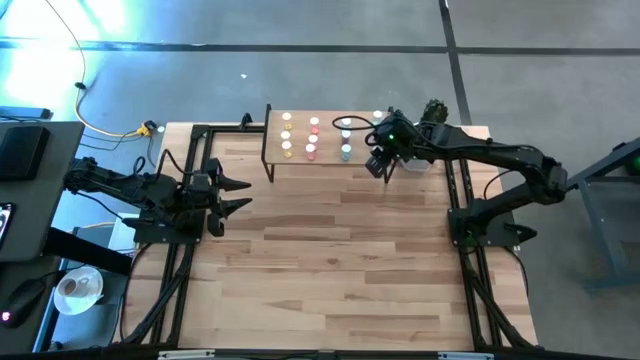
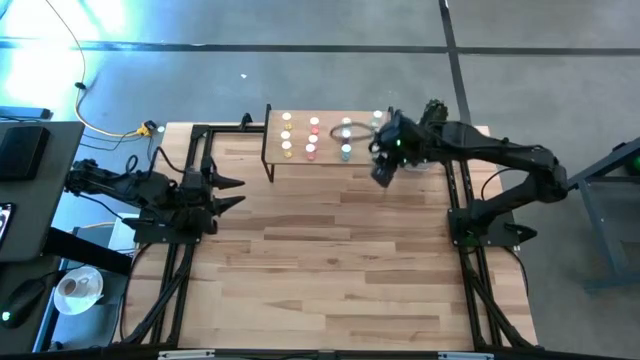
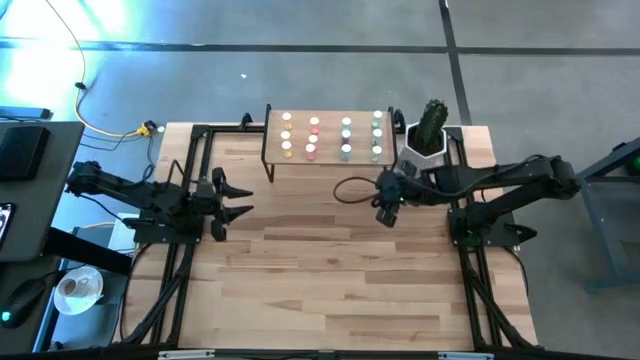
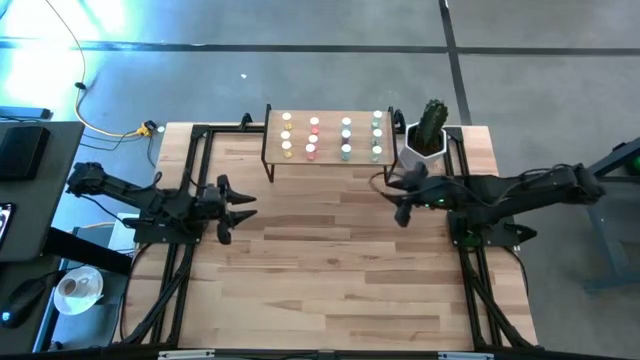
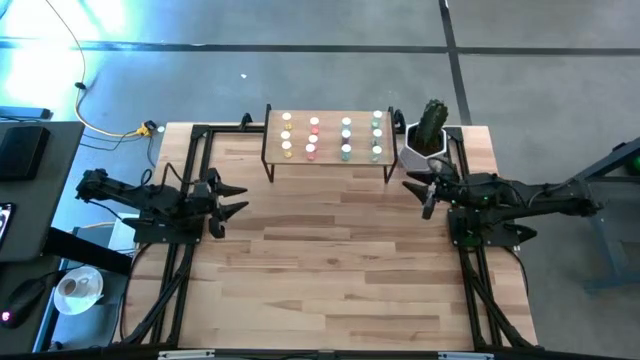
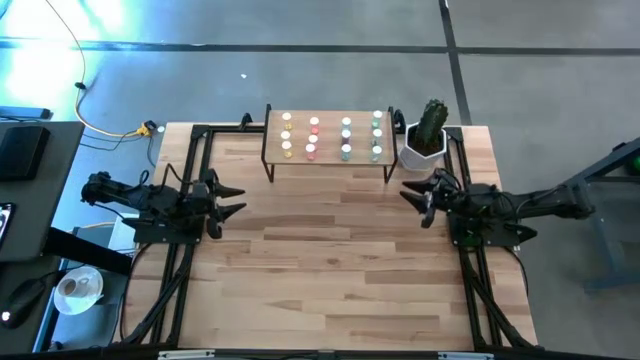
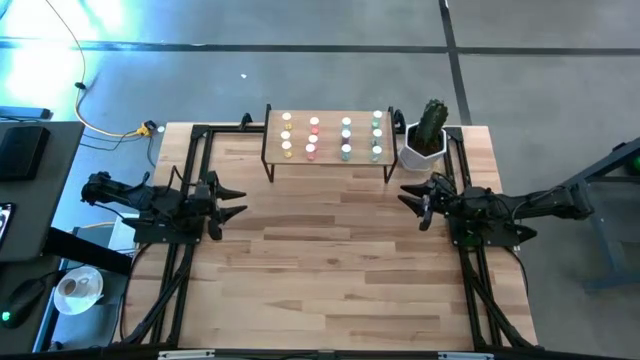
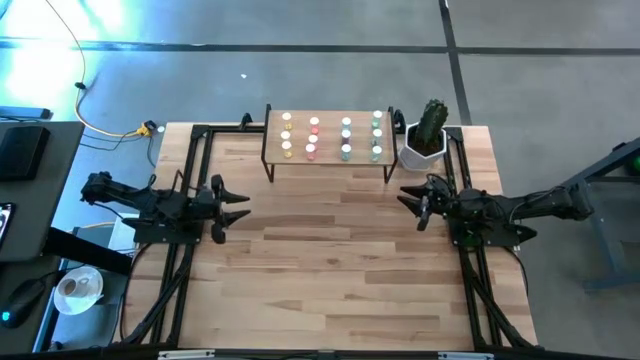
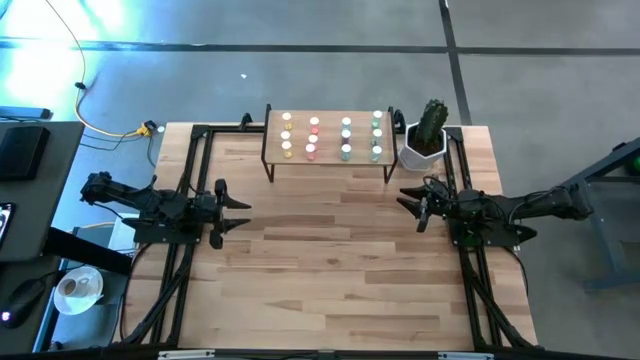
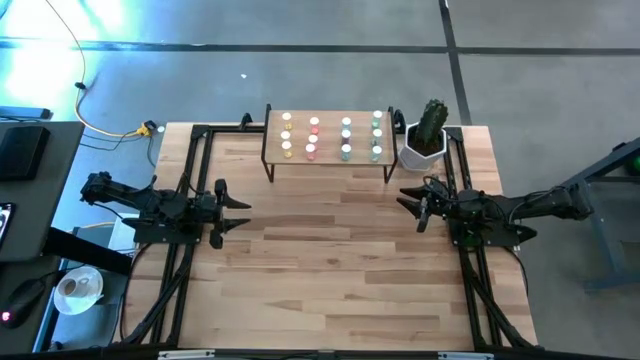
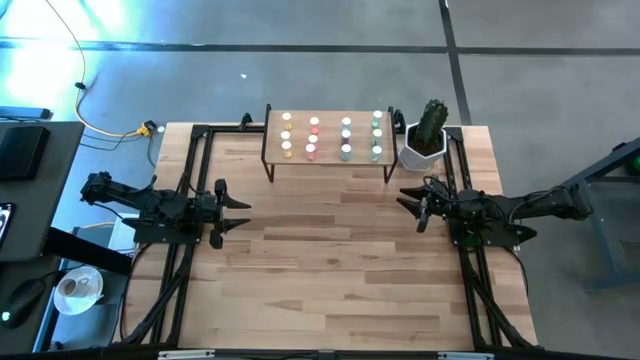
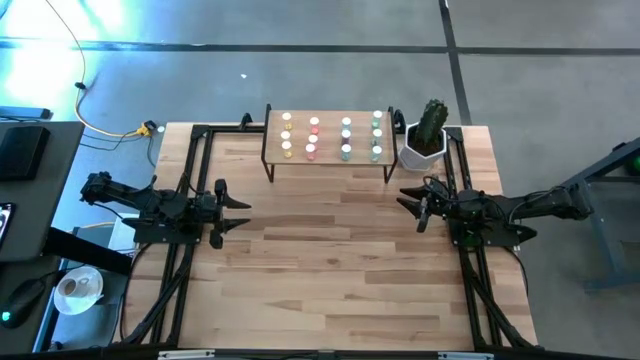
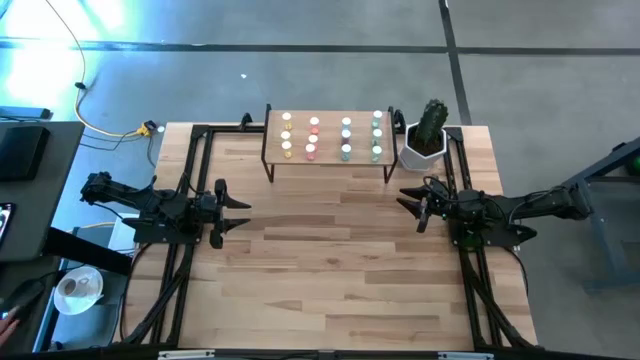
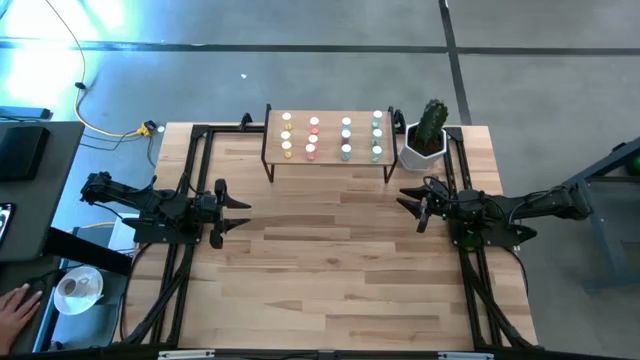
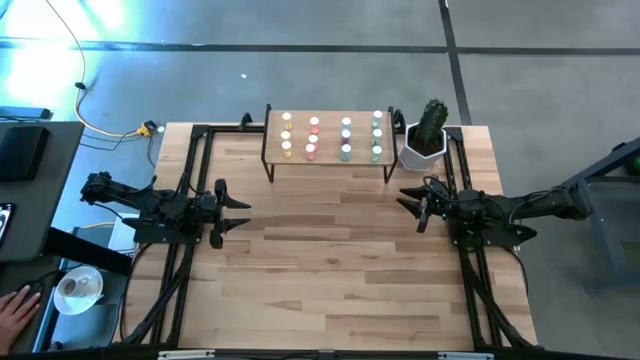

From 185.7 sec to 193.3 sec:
Task: Pick and place medicine bottles onto shelf by color
Return to Home Position

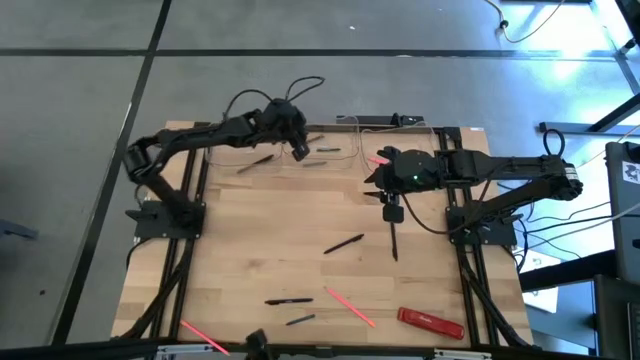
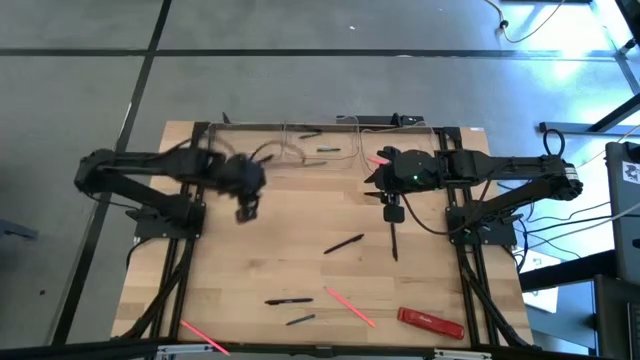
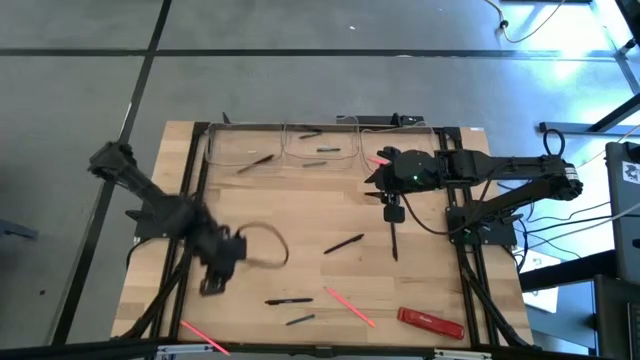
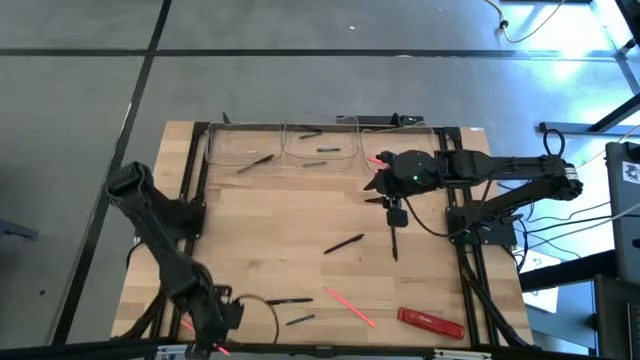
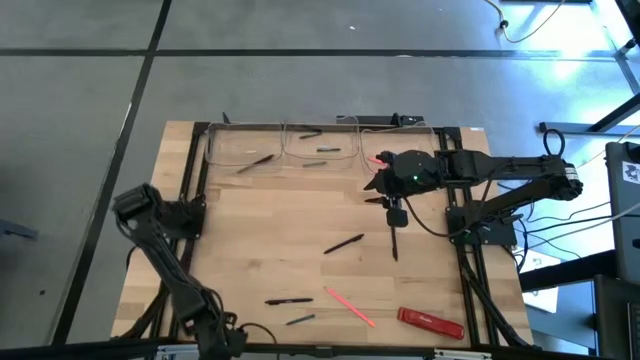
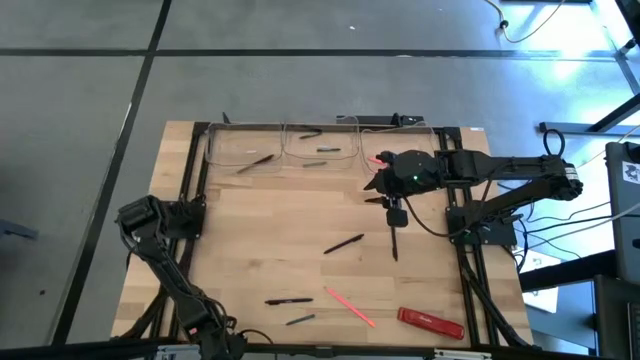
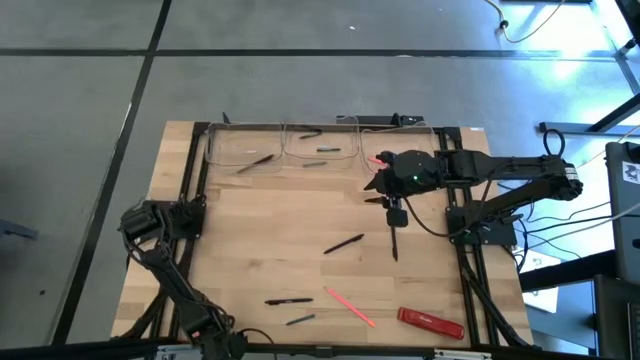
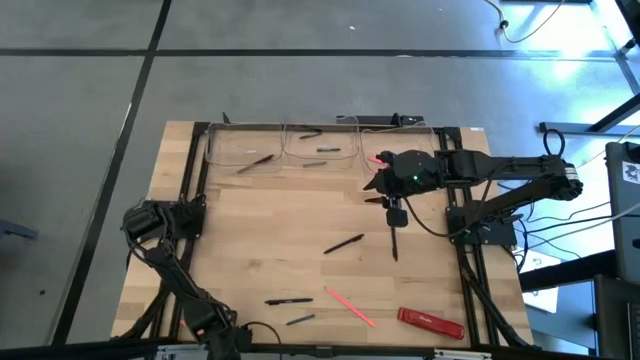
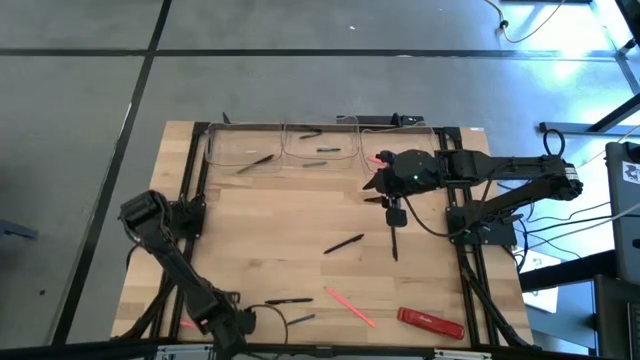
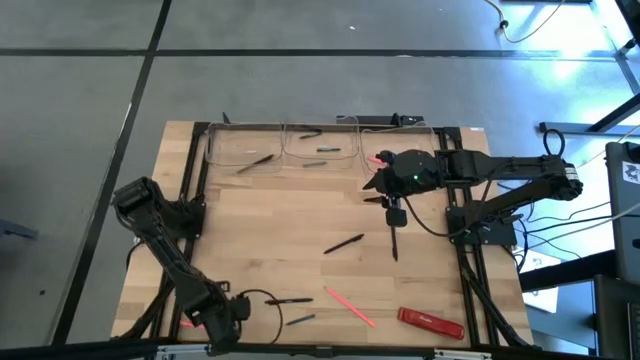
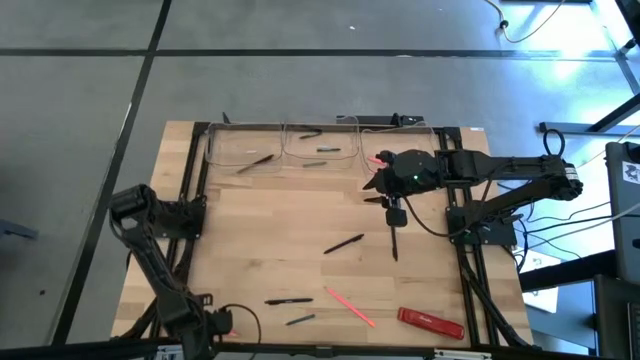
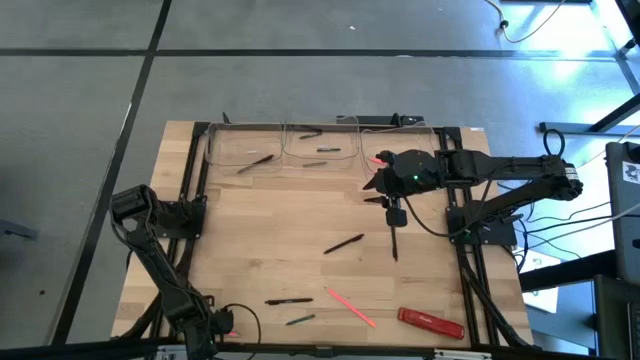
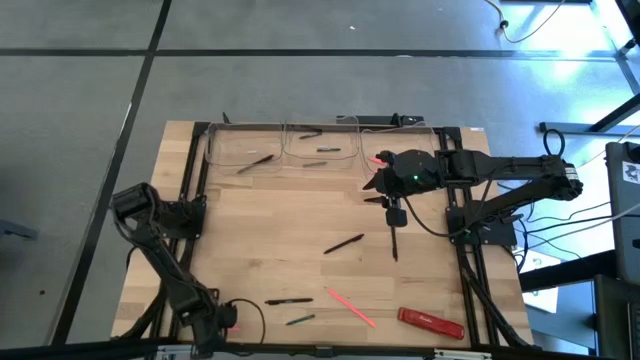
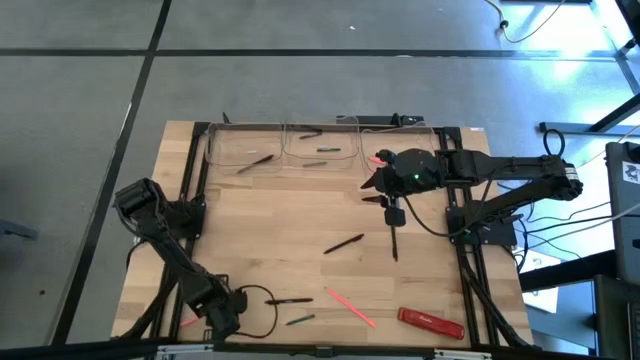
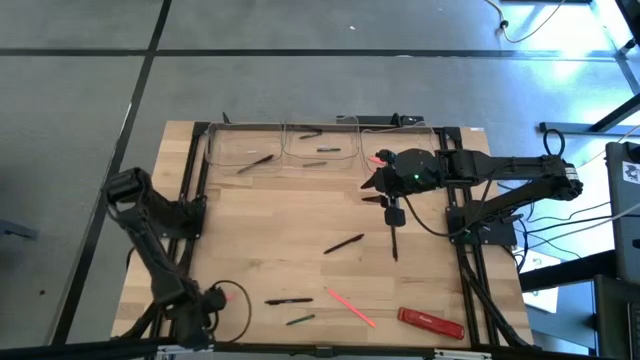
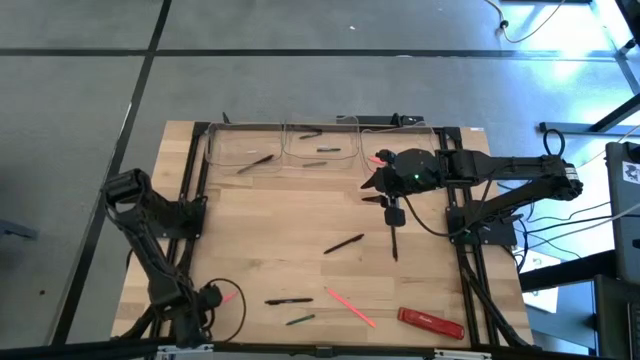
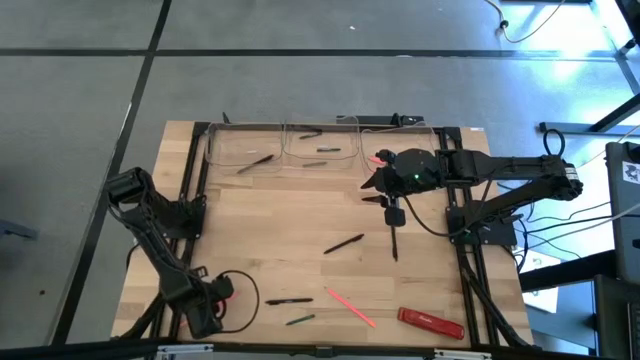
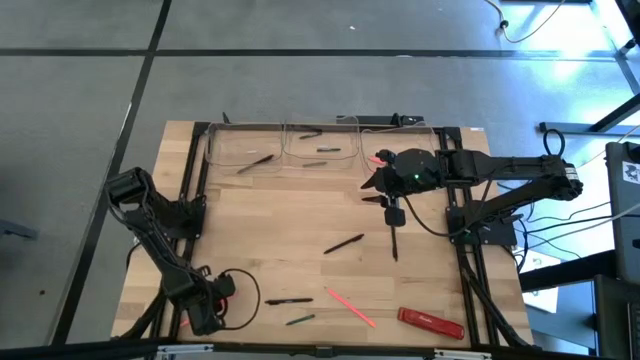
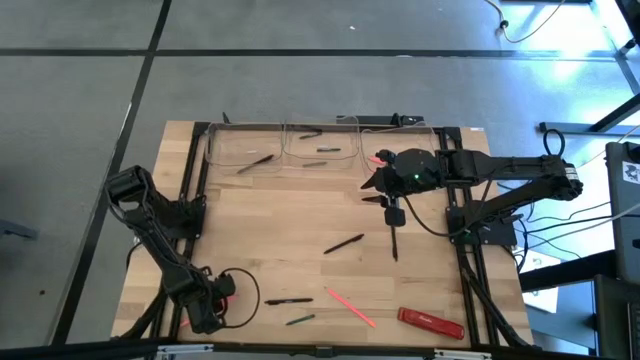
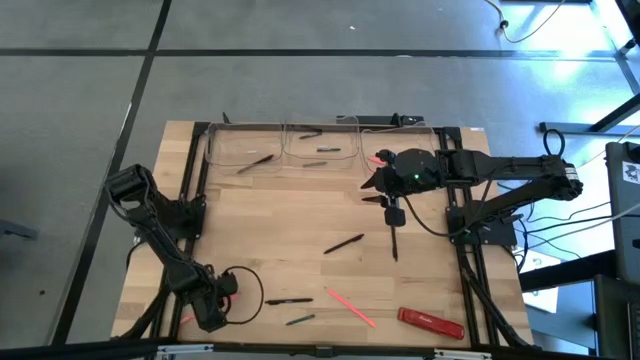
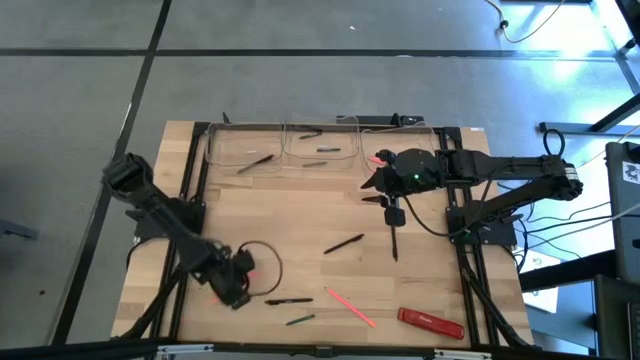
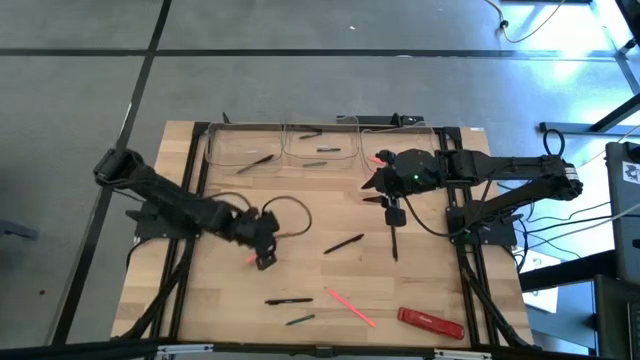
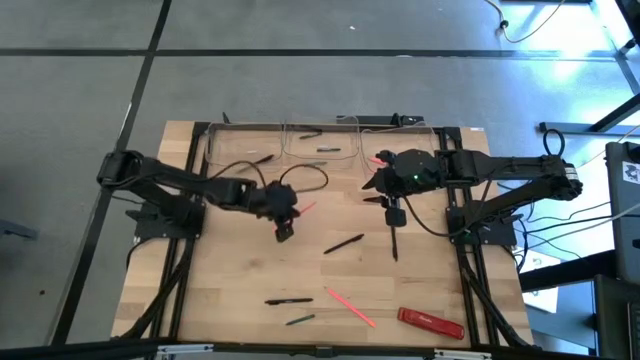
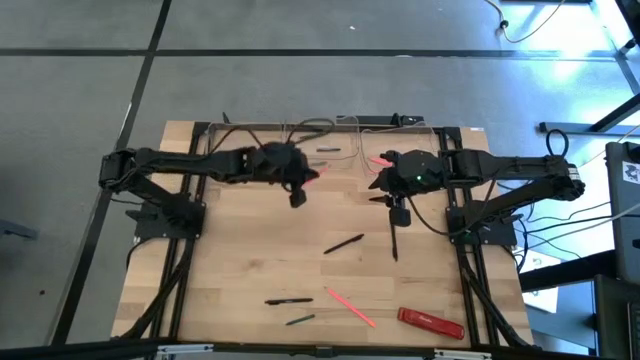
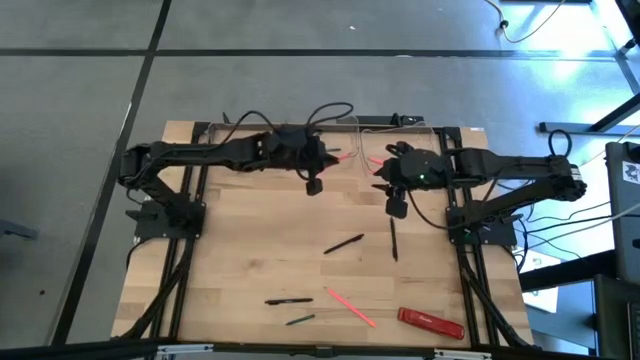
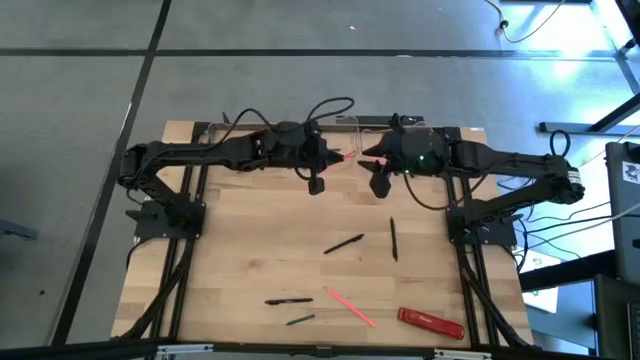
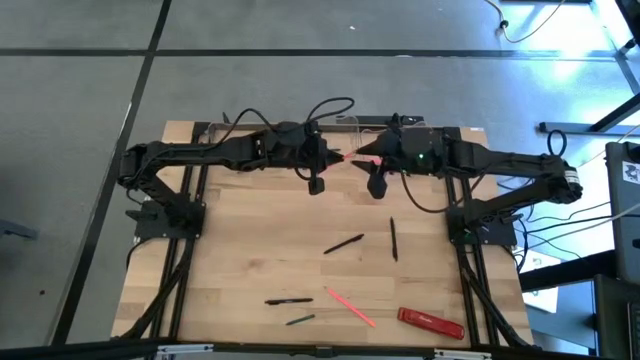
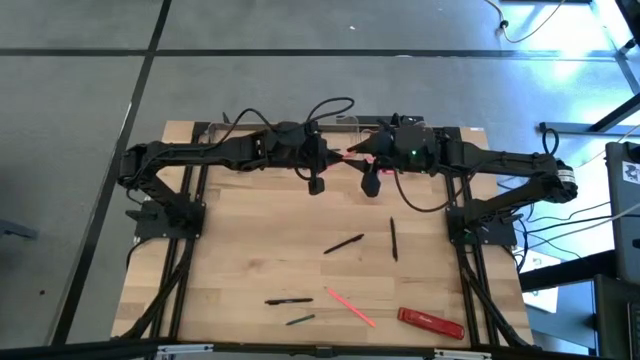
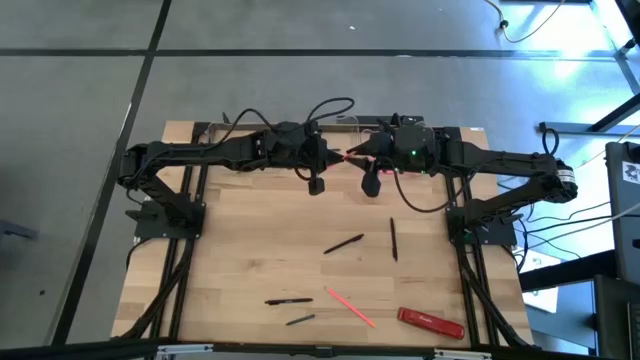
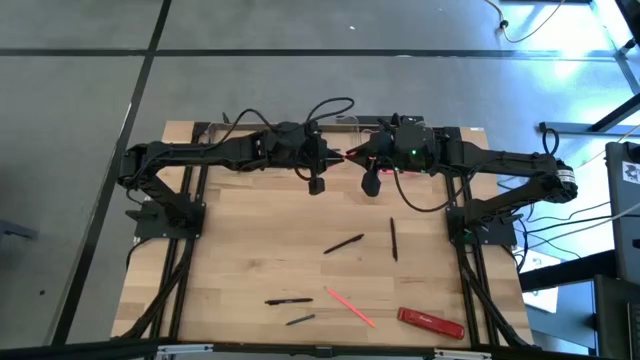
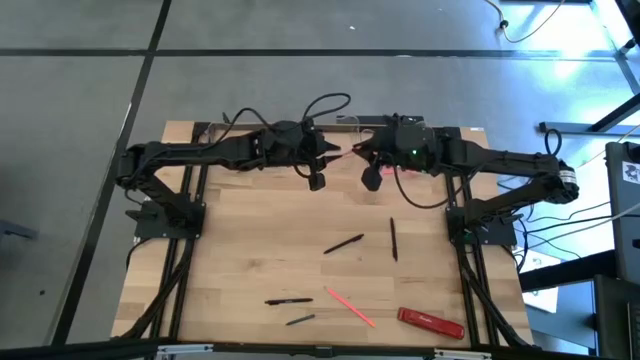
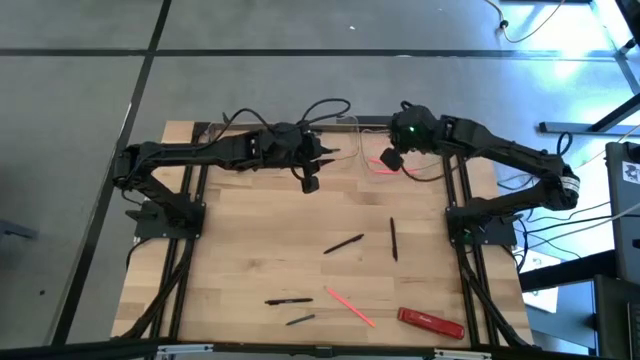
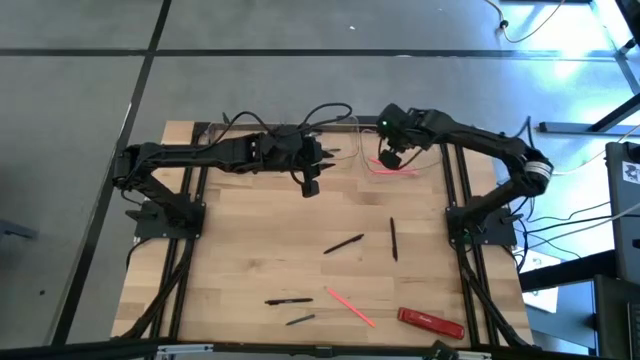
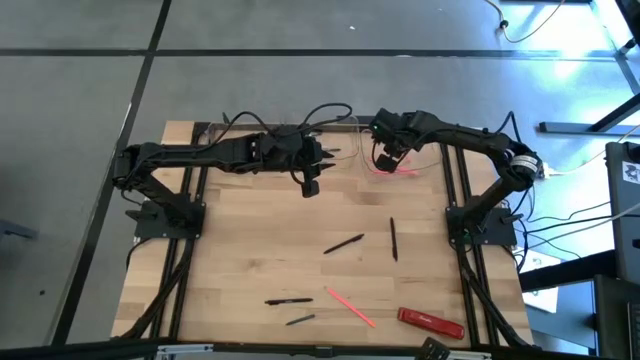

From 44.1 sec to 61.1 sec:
Task: Sort crayons/erasers/pens/pencils in bins
Put the pink pencil into the right transparent bin
